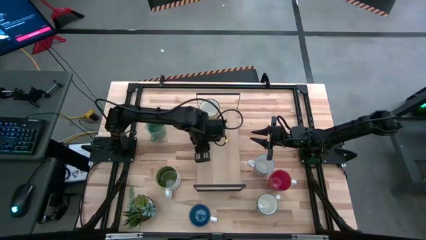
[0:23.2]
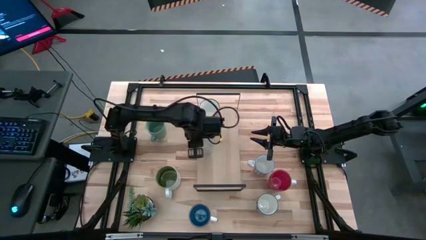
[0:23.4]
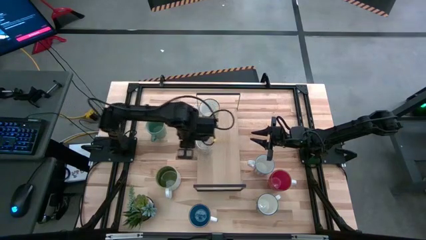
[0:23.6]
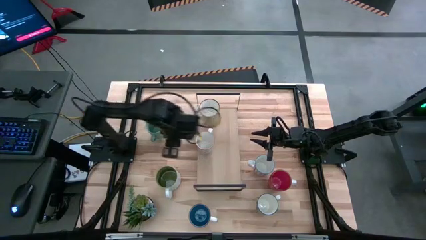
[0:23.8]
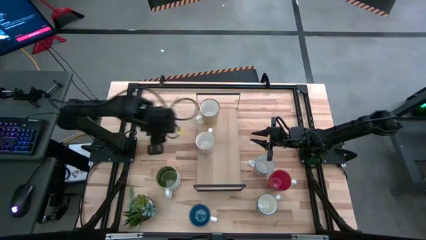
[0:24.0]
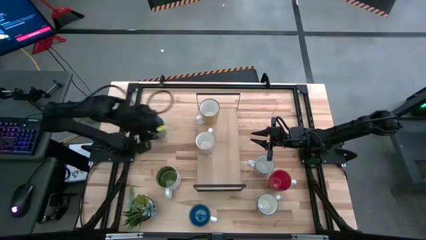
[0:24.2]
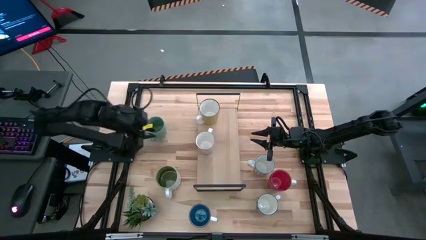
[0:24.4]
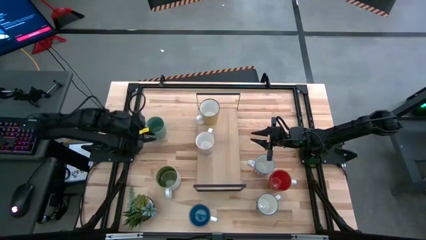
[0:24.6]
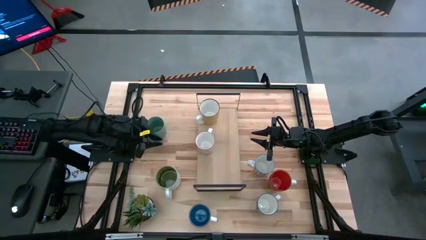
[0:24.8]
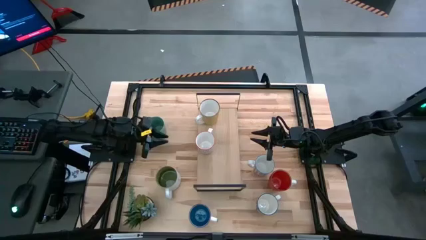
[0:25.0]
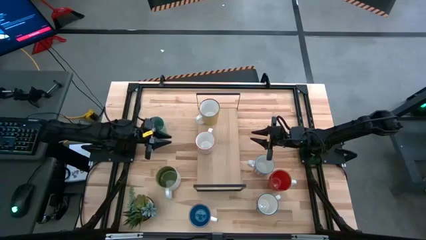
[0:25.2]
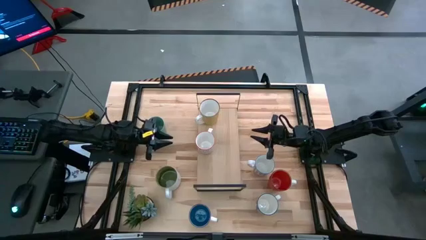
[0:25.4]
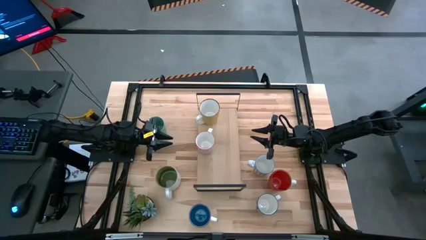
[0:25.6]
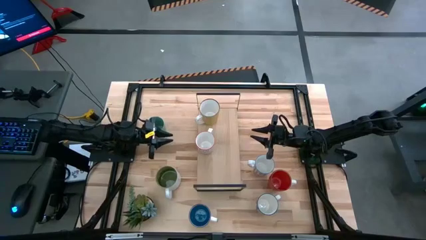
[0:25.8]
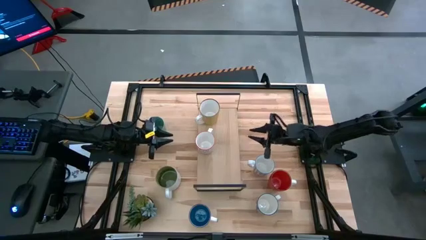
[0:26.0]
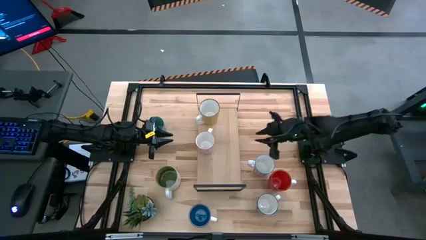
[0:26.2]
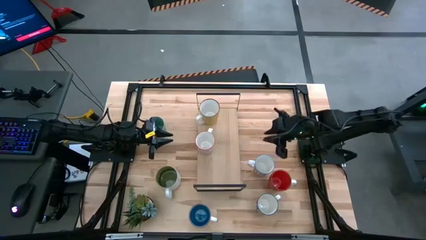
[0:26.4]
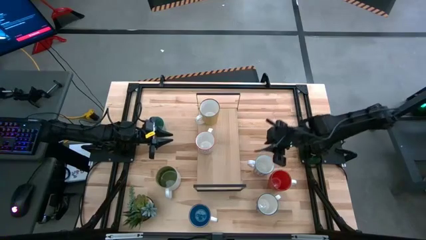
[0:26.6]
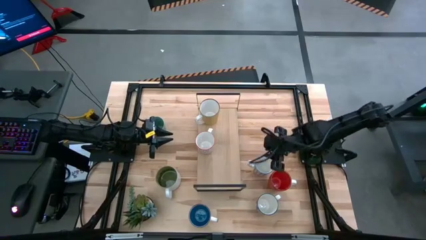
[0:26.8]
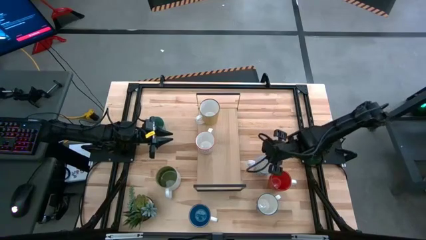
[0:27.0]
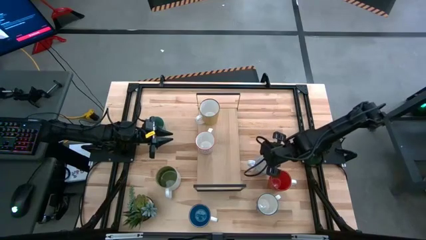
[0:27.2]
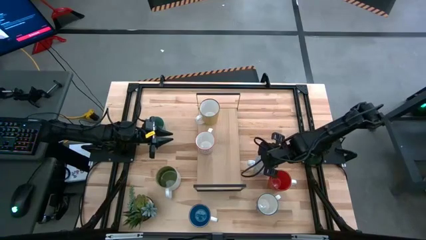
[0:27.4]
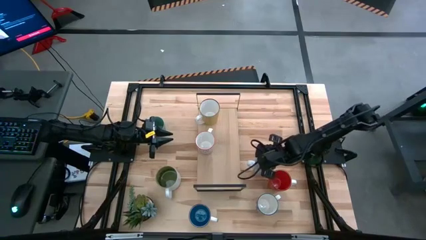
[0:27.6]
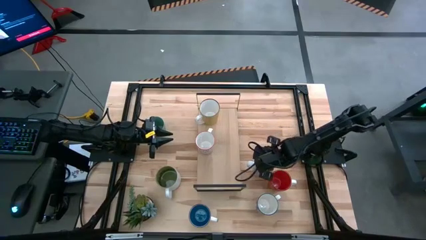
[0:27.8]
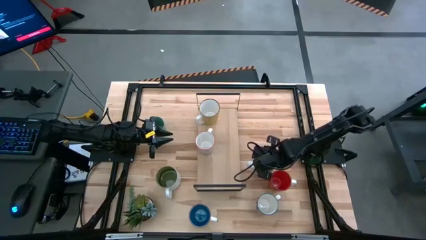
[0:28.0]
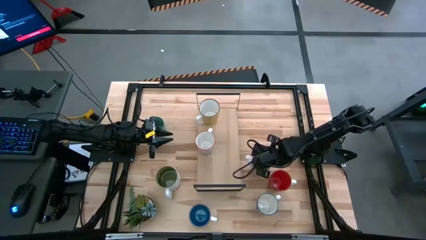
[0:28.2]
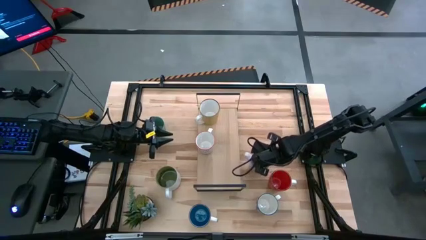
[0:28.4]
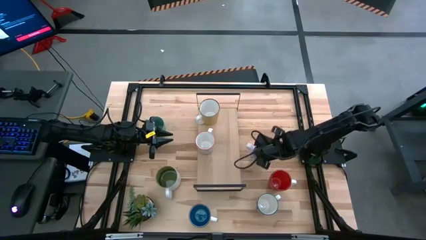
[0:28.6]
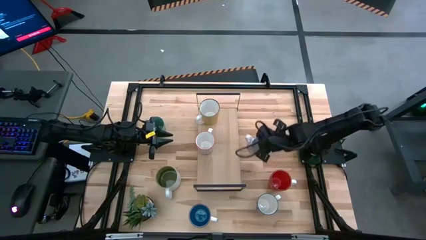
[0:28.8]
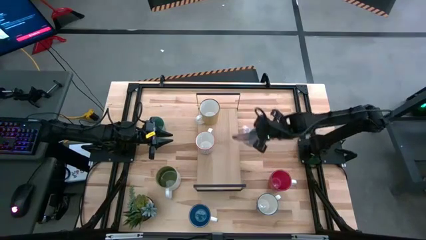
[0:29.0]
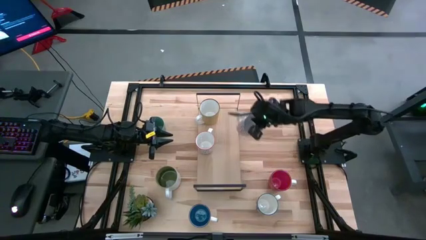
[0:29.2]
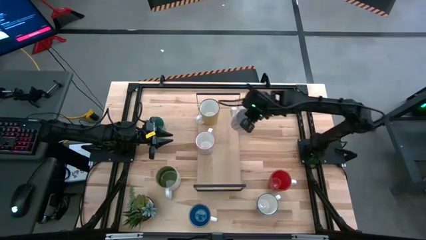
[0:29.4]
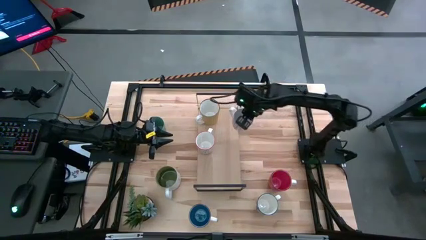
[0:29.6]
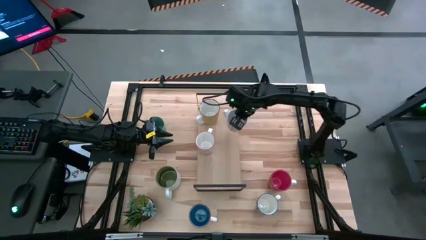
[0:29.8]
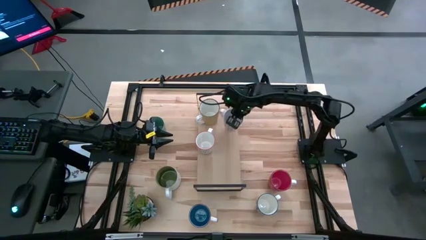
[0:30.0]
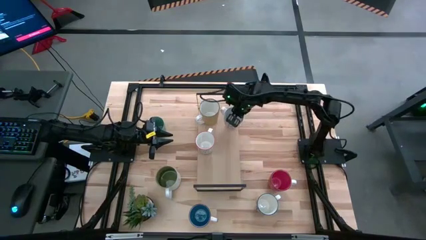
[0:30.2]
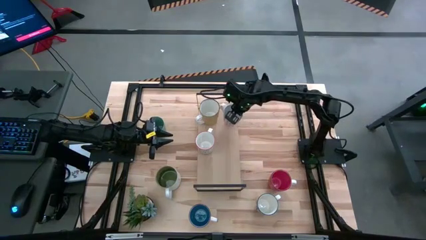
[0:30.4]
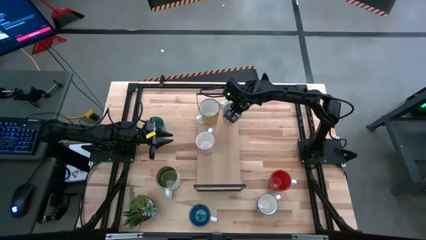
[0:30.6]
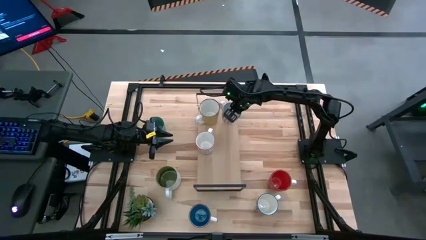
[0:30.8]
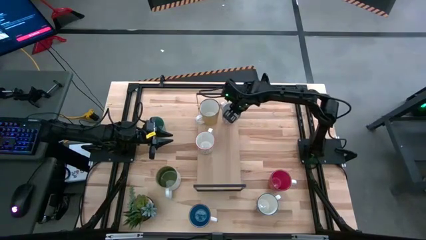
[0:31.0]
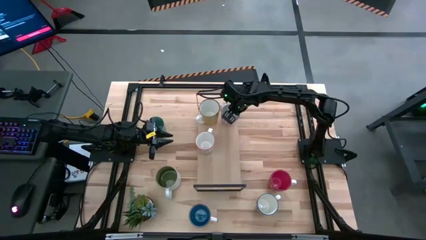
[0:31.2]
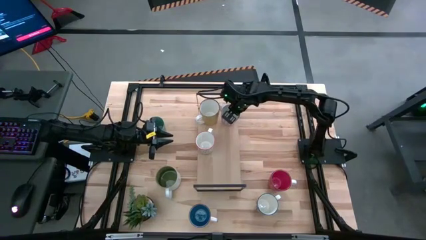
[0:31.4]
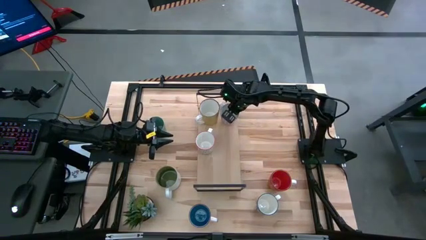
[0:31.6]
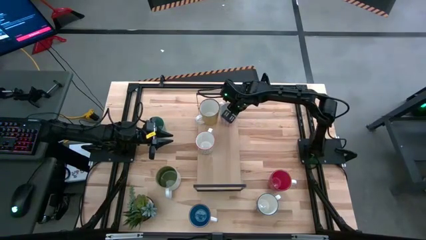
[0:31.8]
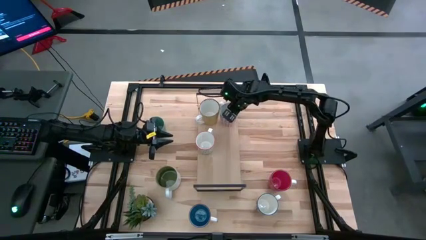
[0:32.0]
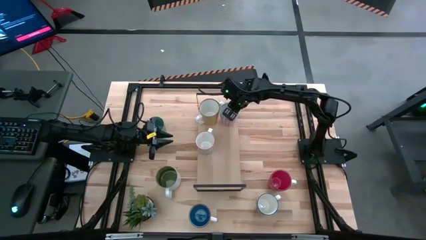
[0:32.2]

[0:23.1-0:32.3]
Task: Place coffee mugs
Put the white and red patterned mug on the shelf

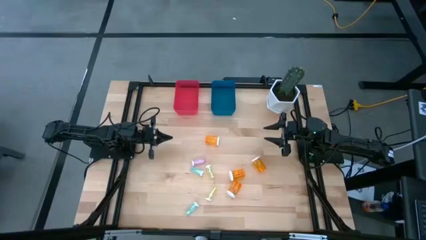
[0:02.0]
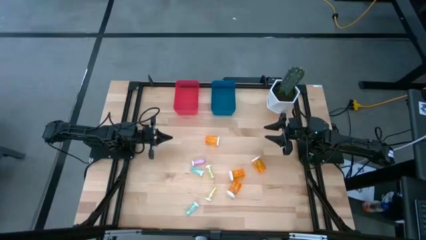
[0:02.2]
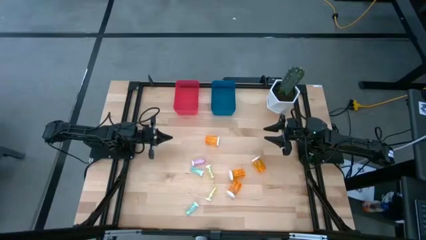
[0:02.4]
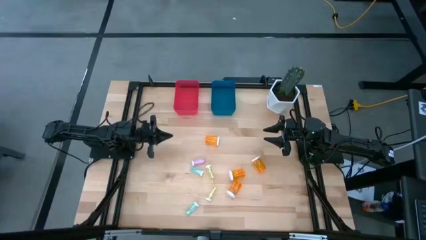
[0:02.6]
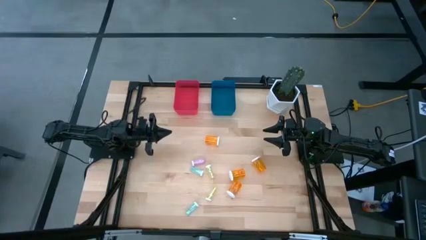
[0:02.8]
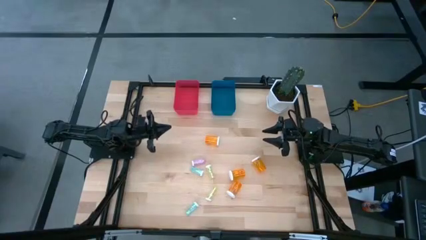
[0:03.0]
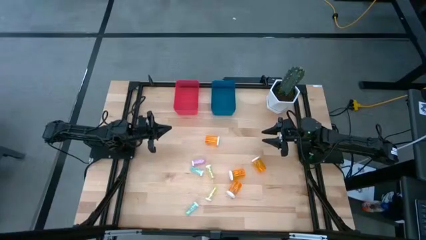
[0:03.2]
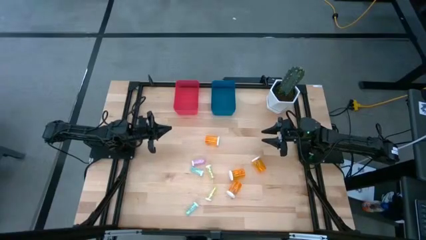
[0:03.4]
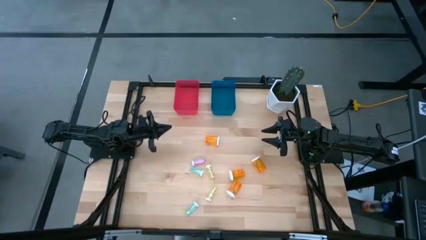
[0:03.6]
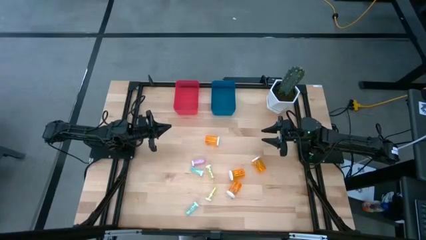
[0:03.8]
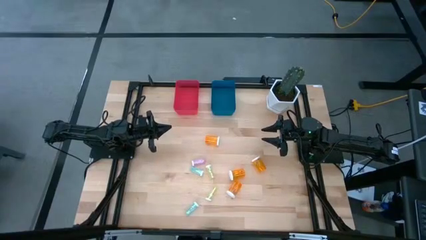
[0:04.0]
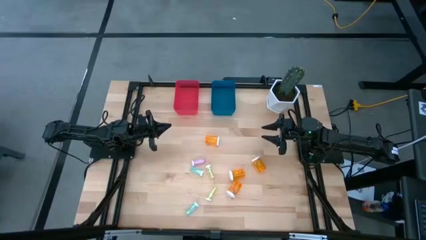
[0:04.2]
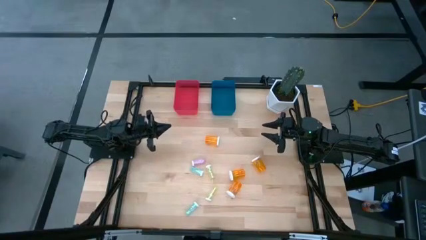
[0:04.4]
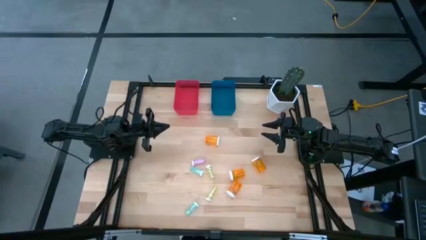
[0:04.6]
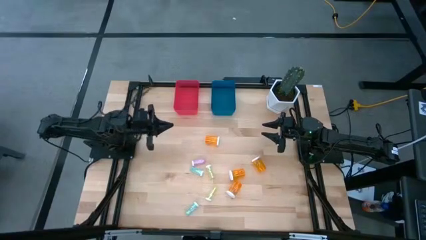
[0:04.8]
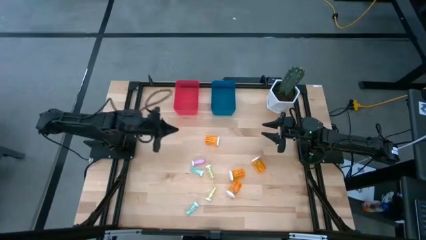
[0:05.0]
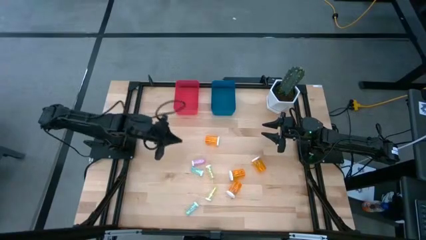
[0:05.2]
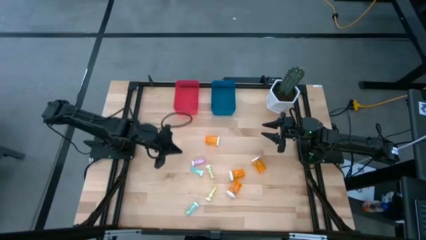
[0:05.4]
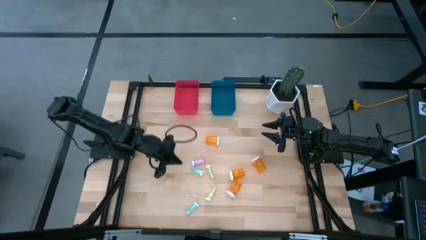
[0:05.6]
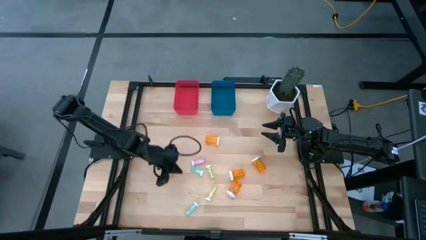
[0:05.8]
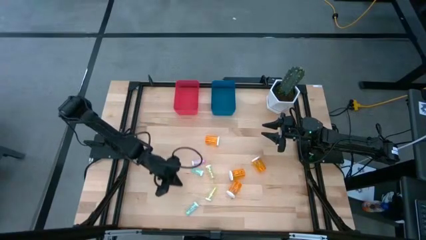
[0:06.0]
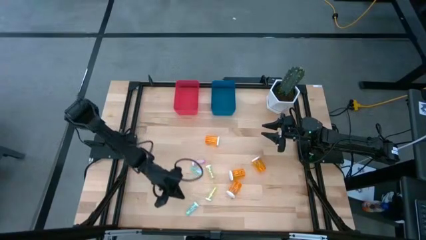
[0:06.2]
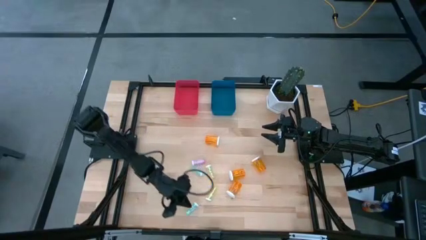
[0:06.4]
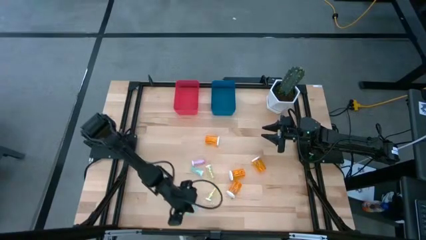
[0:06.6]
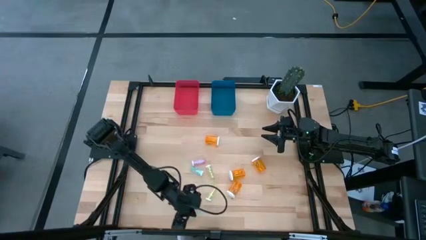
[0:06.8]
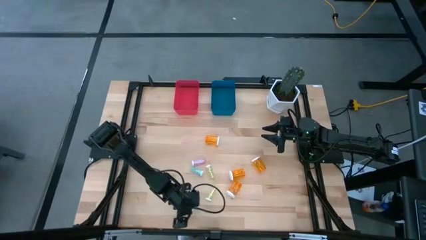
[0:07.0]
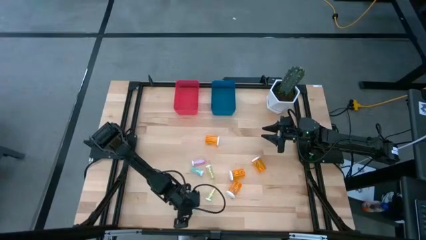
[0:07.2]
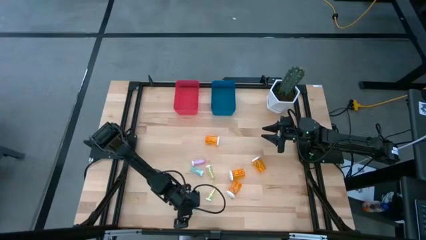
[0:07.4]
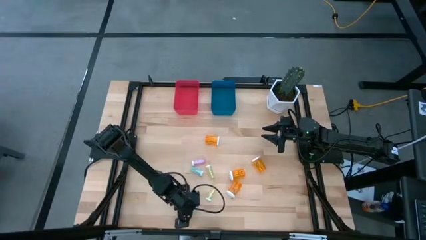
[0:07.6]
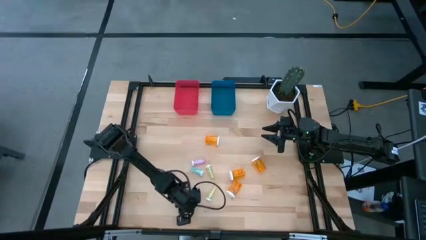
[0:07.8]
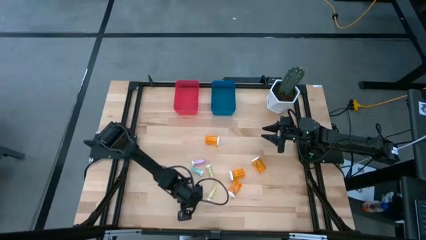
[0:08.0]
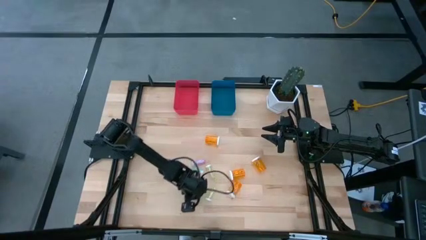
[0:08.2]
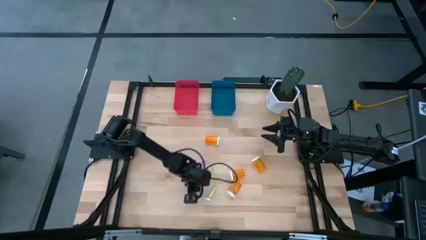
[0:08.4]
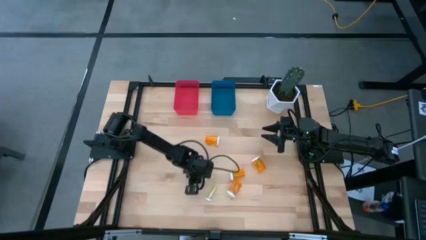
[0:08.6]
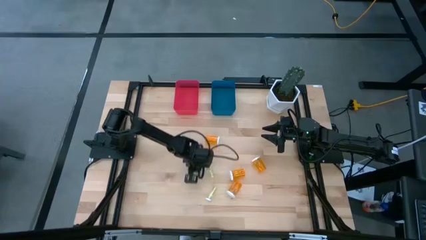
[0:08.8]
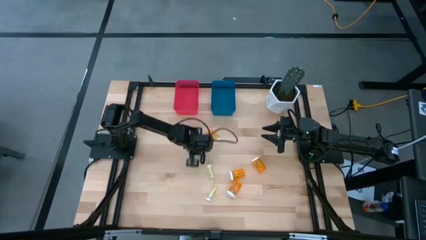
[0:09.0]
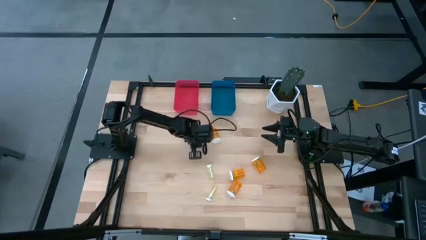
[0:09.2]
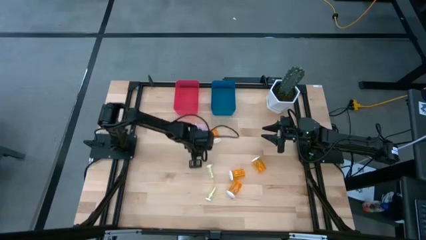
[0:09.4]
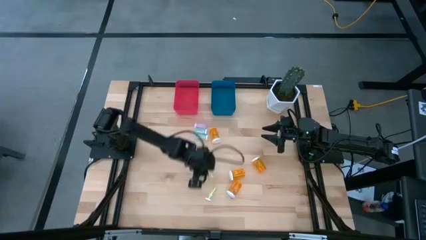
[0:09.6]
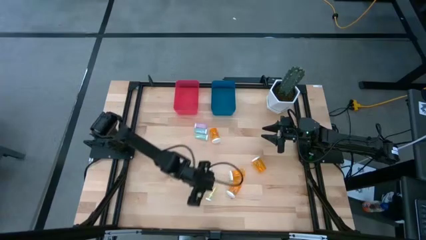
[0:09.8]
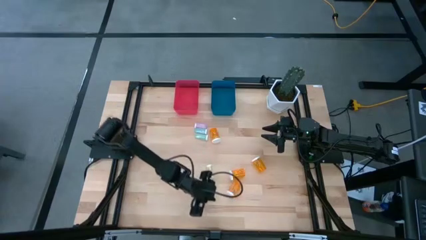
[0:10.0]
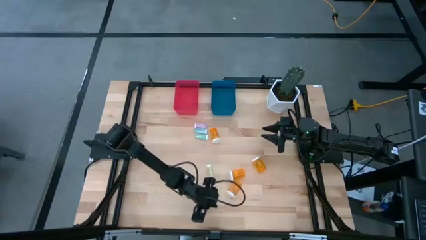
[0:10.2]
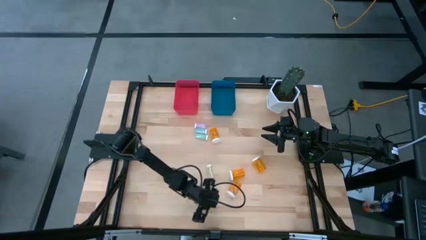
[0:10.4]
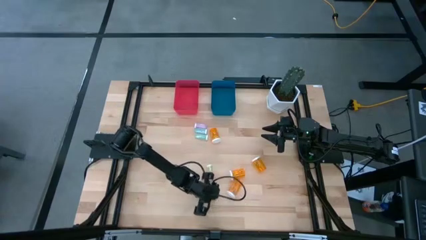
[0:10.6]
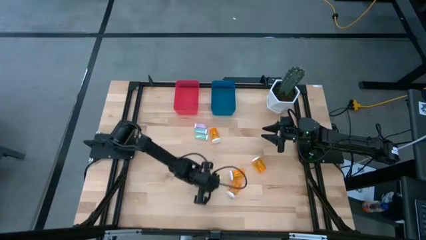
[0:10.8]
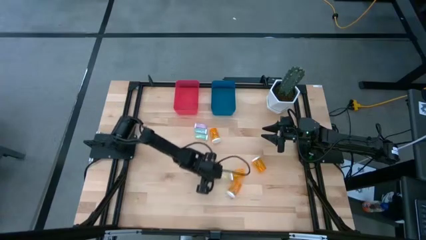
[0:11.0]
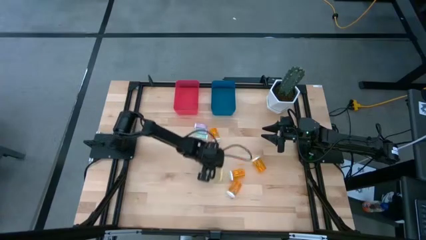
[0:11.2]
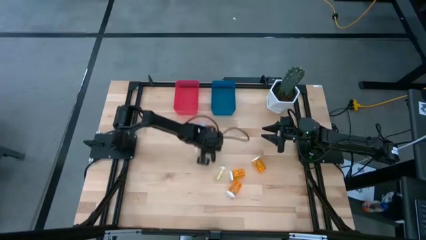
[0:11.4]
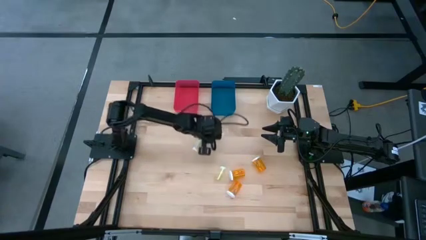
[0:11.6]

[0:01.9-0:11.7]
Task: Pick and place medicine bottles into bin by pill shape (circle, oval)
Adjust the pill bottles
